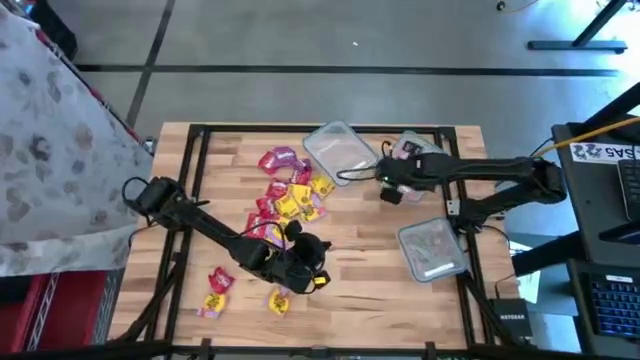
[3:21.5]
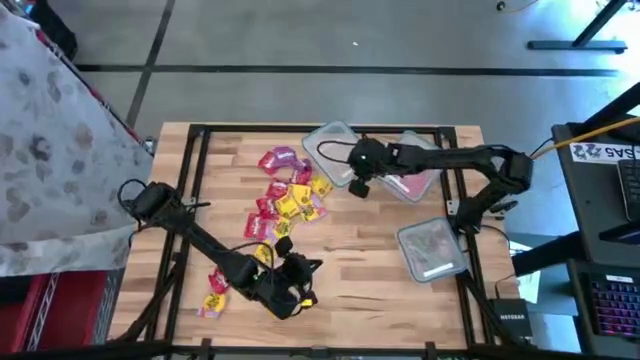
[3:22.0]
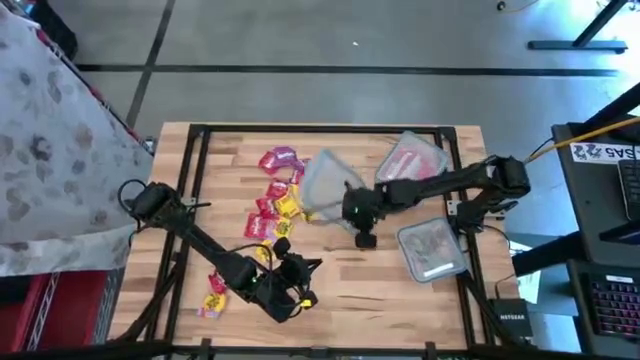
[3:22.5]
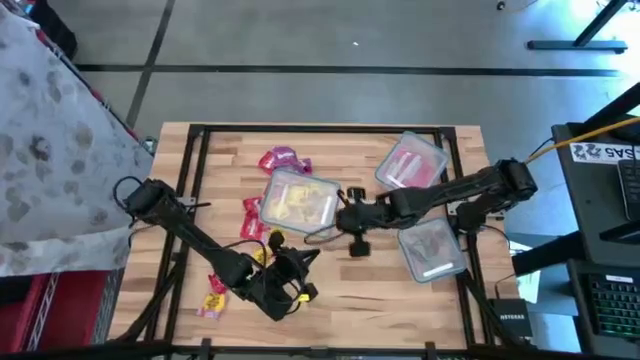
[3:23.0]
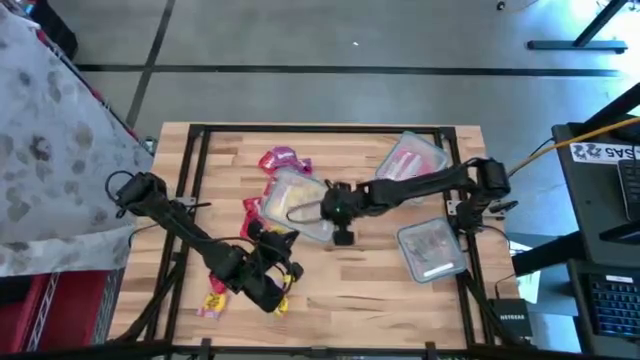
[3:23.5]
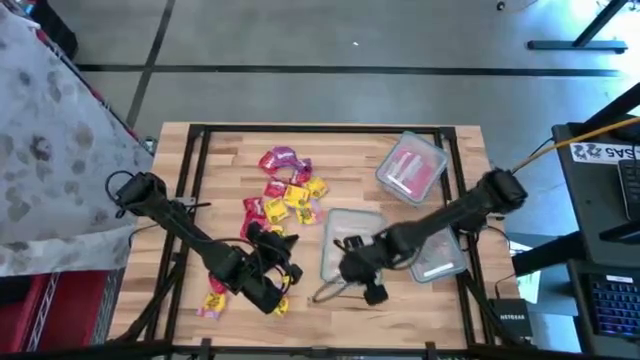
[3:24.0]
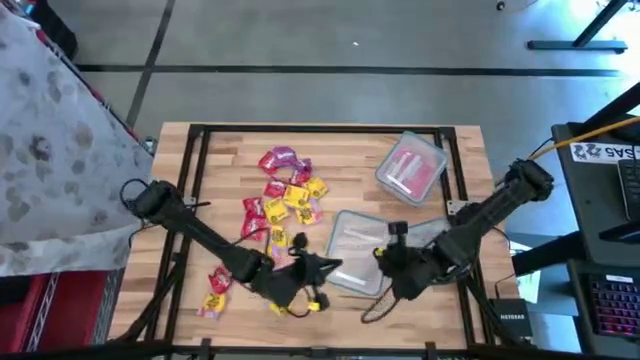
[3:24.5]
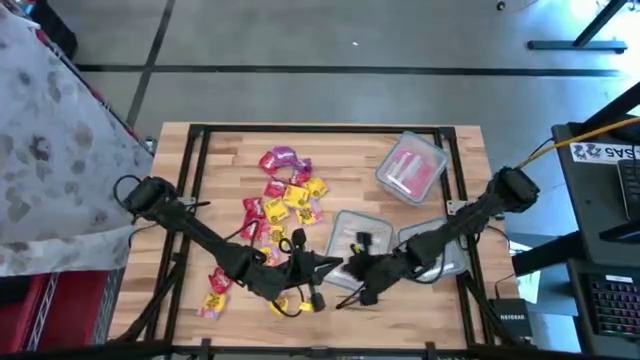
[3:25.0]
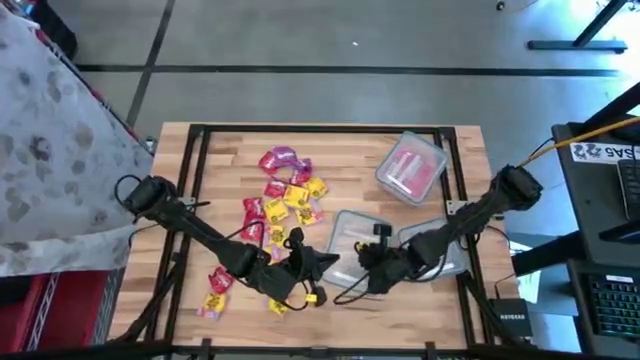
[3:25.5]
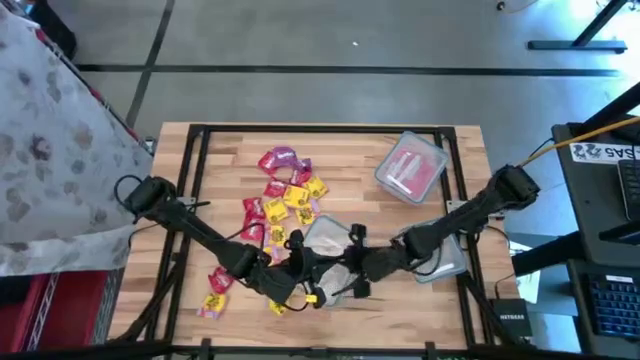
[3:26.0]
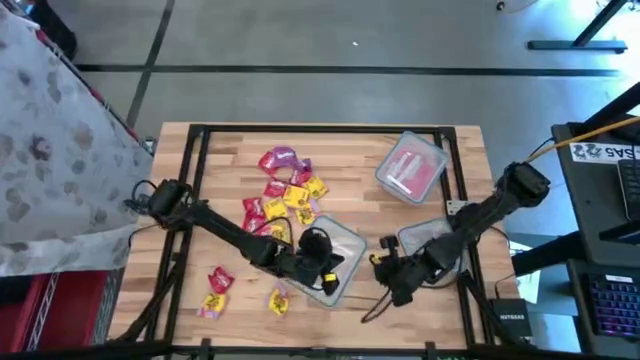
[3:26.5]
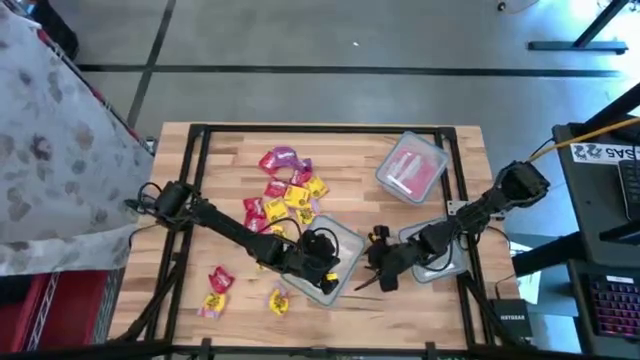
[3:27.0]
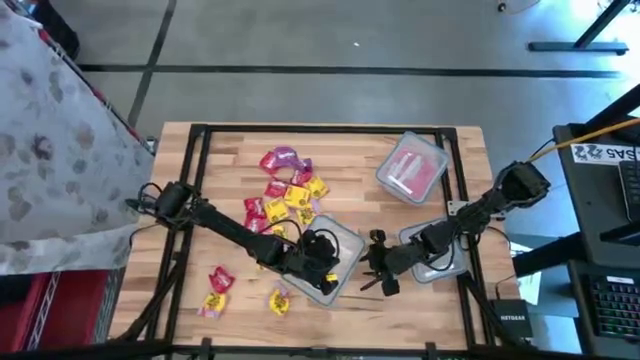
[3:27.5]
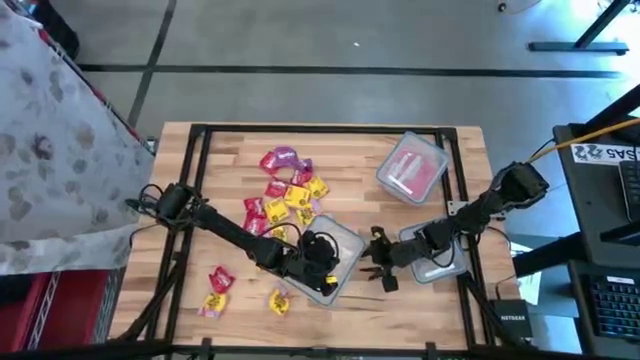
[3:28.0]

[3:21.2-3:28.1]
Task: Sort candy
Open the rectangular transparent food container

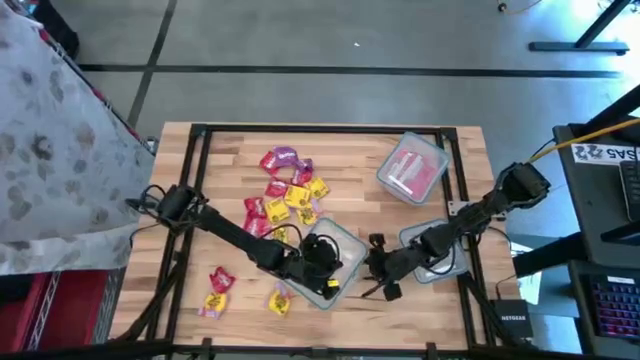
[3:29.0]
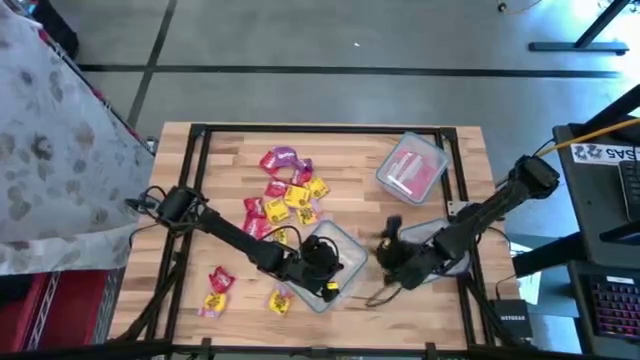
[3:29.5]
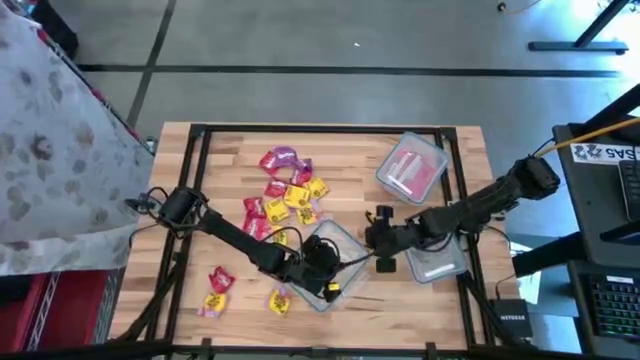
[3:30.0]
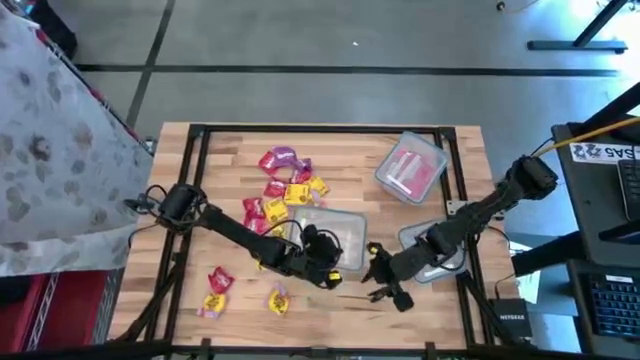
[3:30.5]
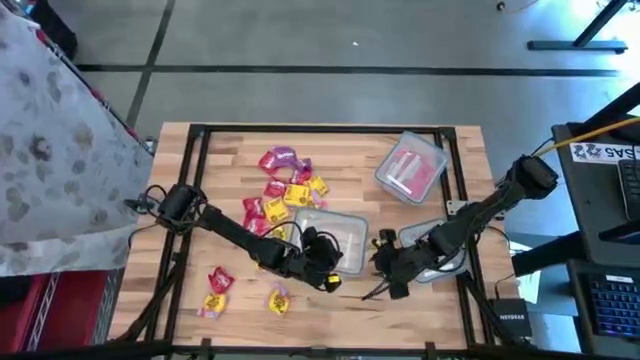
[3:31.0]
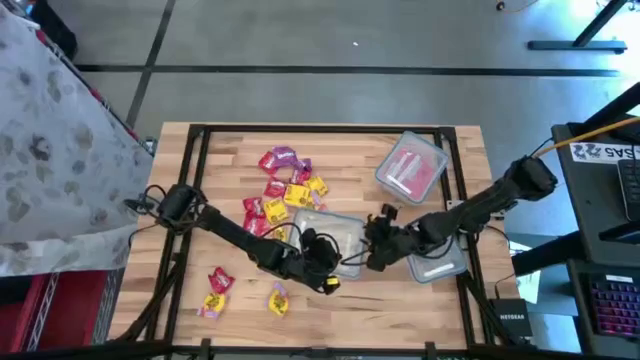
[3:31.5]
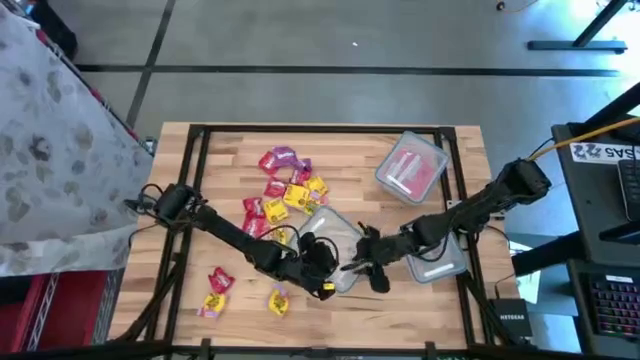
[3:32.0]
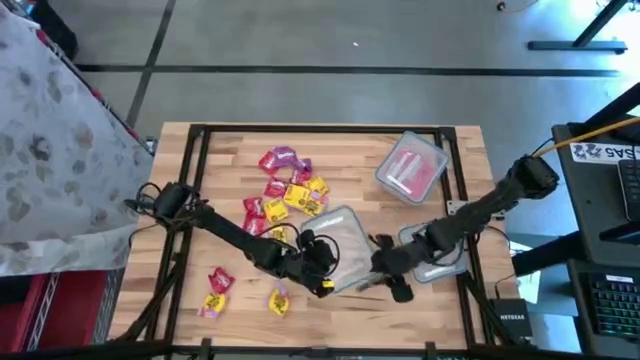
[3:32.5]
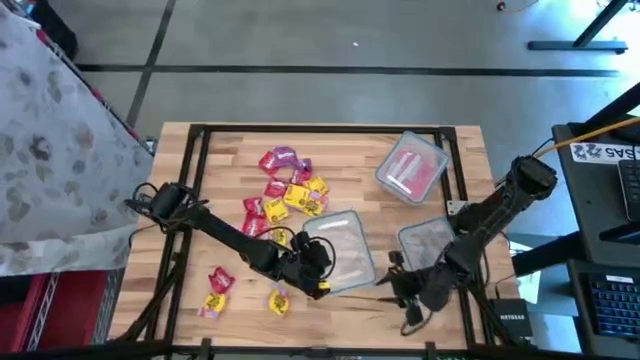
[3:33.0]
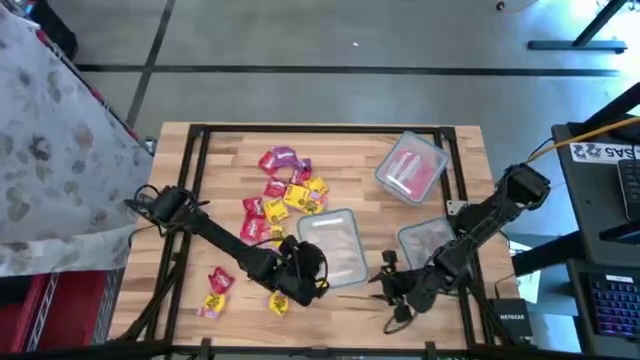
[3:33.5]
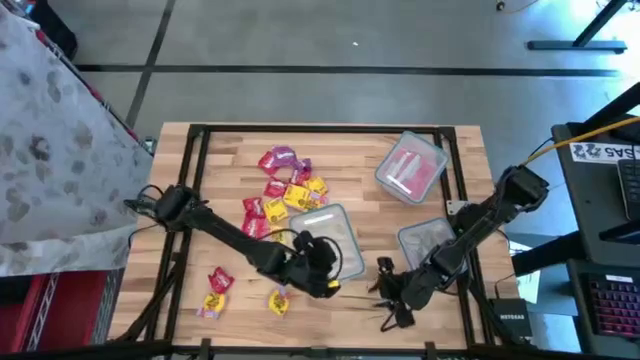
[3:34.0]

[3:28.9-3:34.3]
Open the rectangular transparent food container

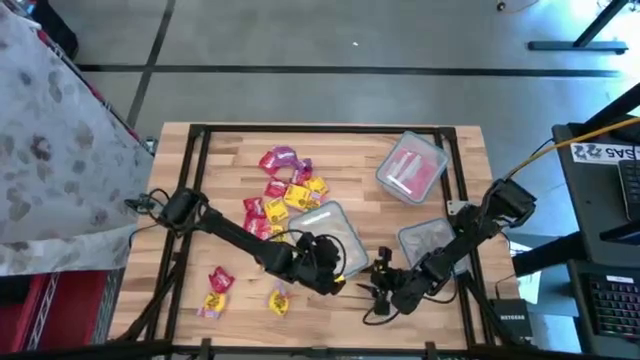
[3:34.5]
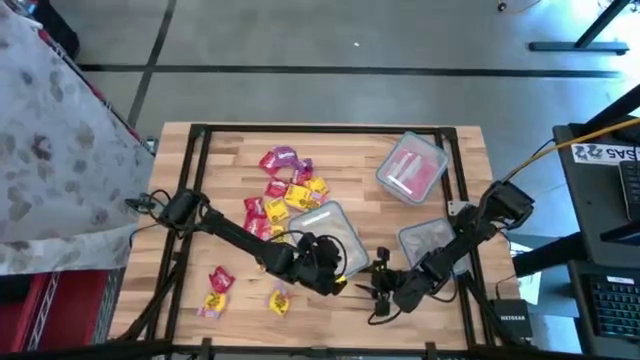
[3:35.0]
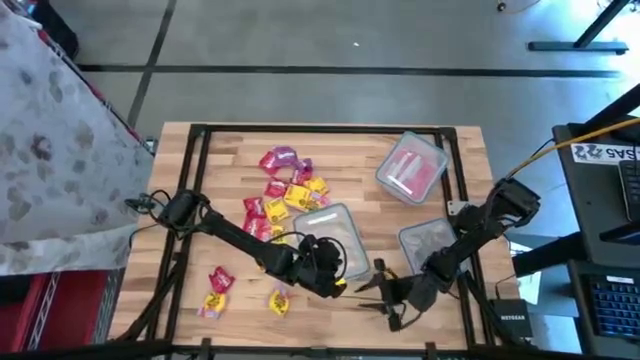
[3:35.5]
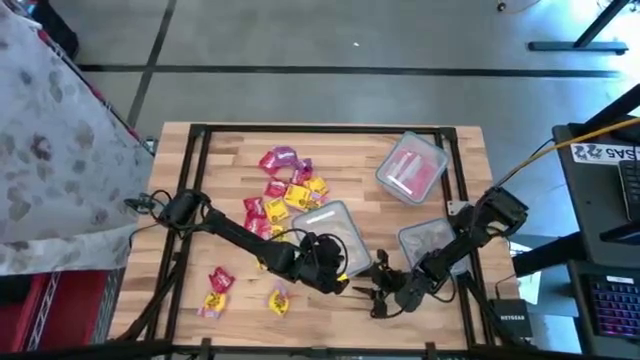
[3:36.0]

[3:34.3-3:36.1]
Open the rectangular transparent food container

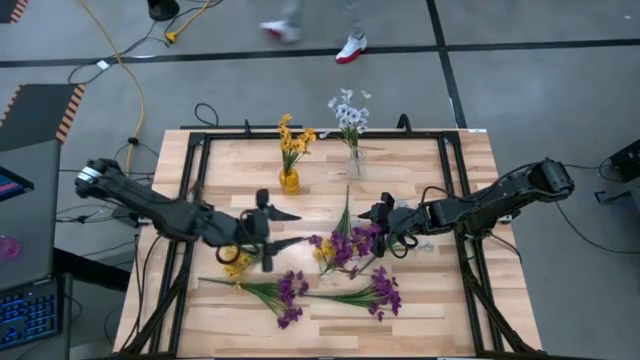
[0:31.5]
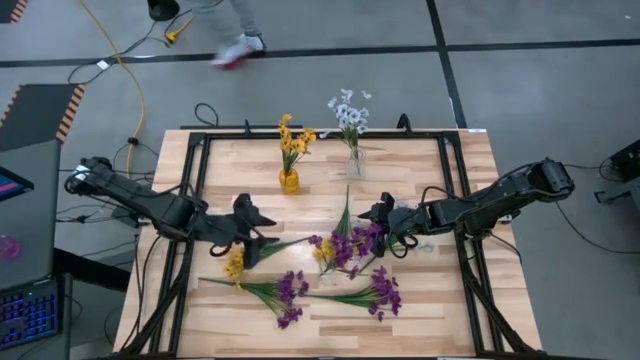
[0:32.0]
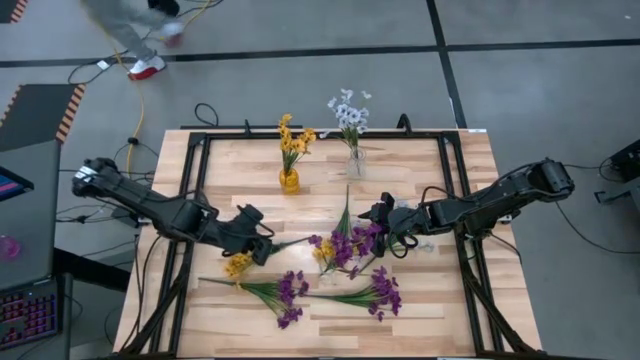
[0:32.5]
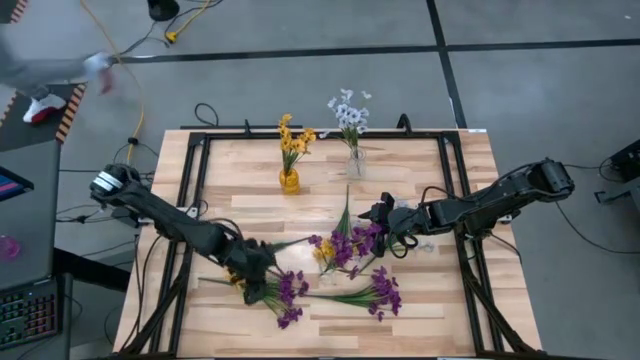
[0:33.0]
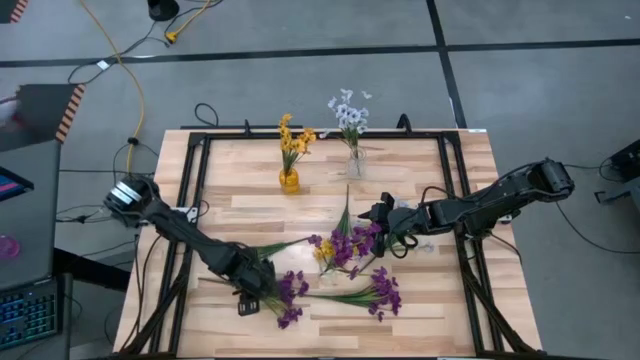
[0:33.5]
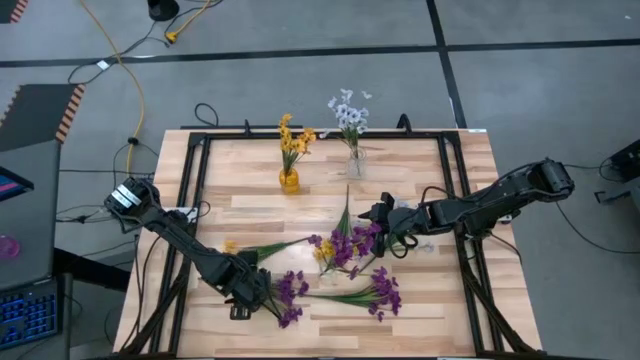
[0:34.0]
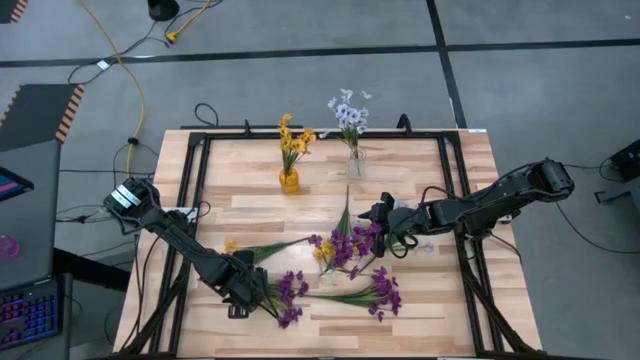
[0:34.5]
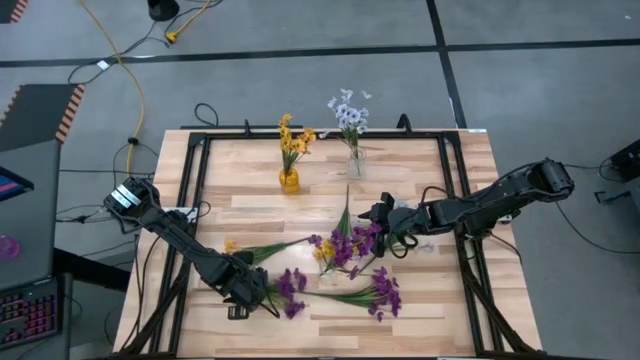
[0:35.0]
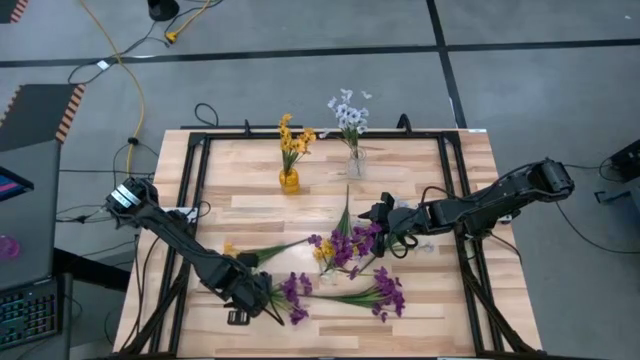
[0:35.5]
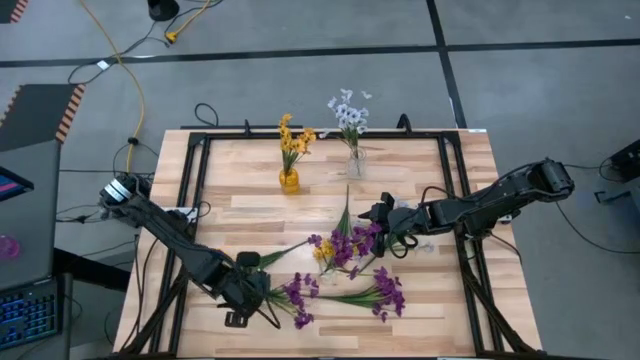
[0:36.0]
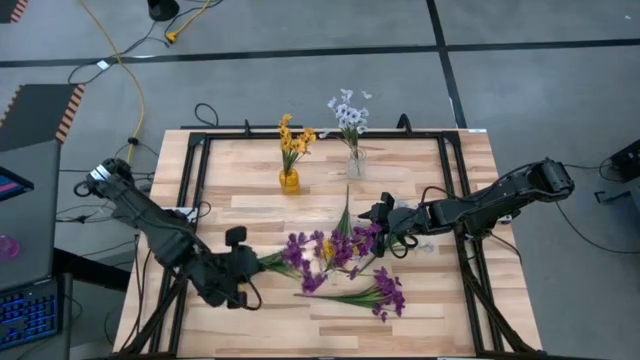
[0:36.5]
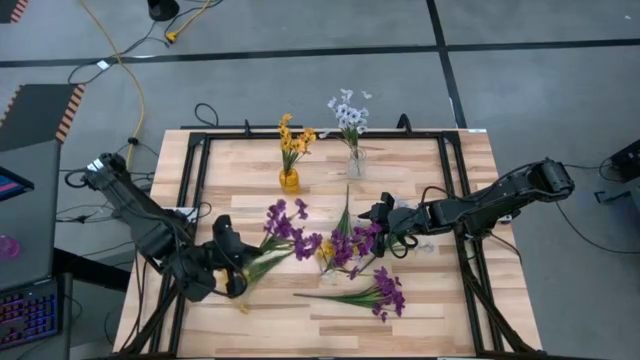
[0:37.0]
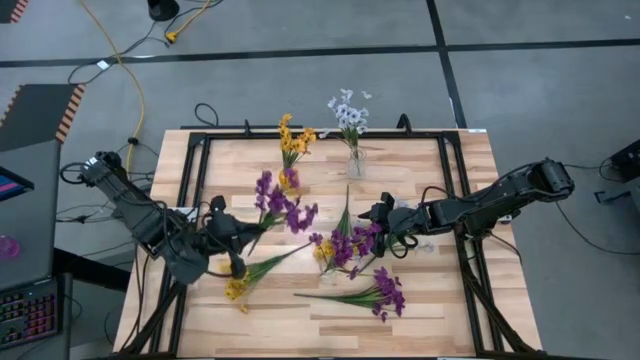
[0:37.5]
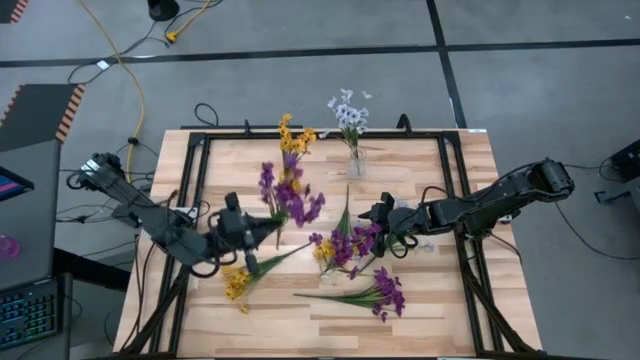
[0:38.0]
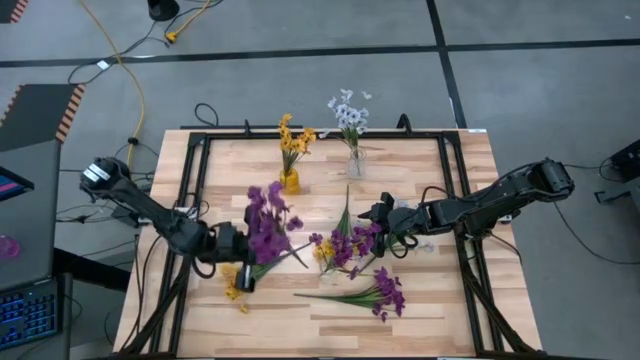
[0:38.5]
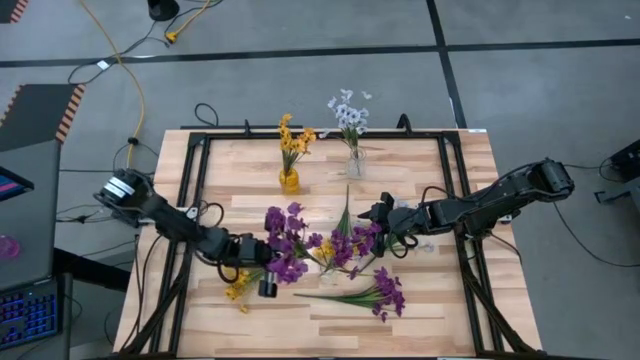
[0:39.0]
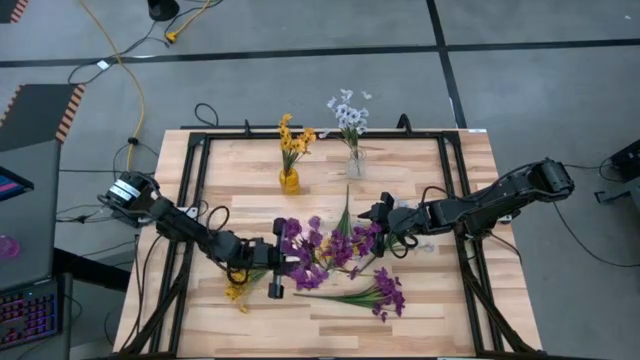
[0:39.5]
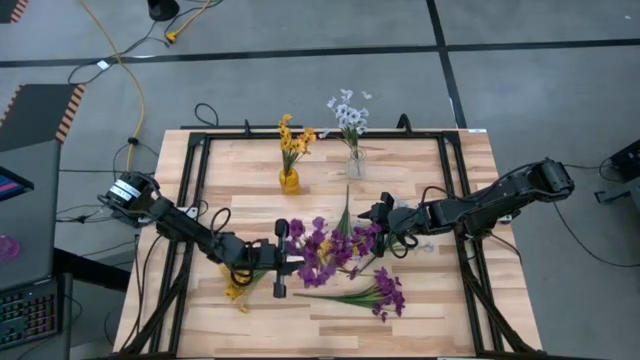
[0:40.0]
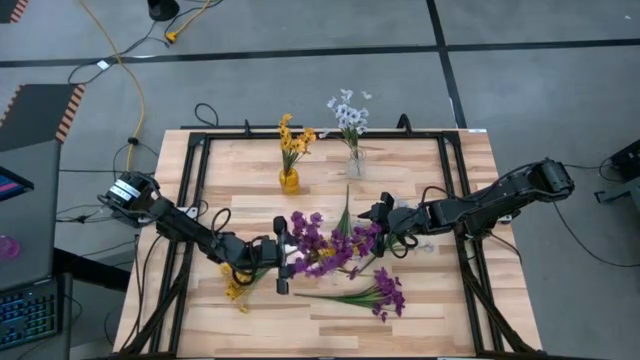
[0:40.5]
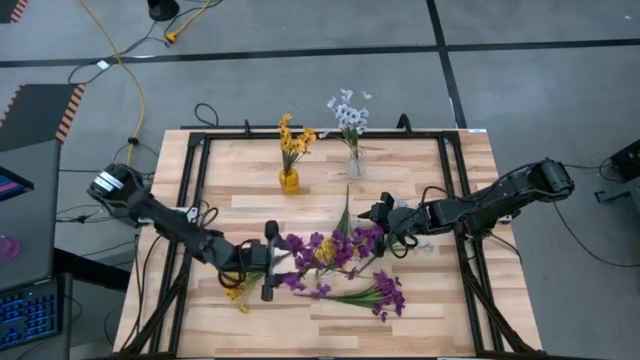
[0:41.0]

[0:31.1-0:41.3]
Task: Sort flowers into vase by color
Put the left violet flowers into the bottom transparent vase
